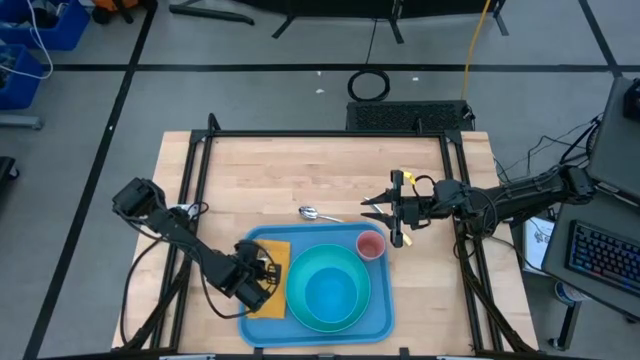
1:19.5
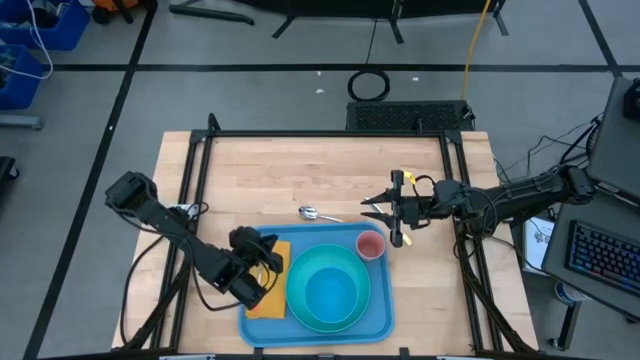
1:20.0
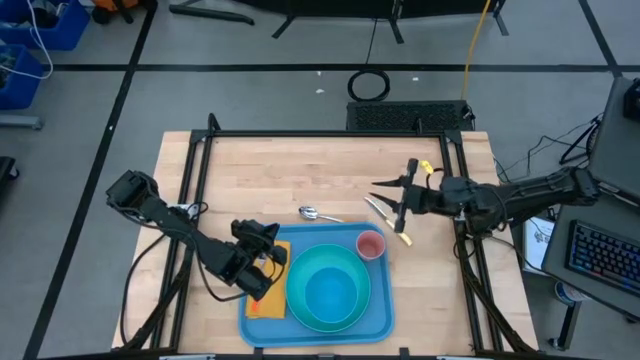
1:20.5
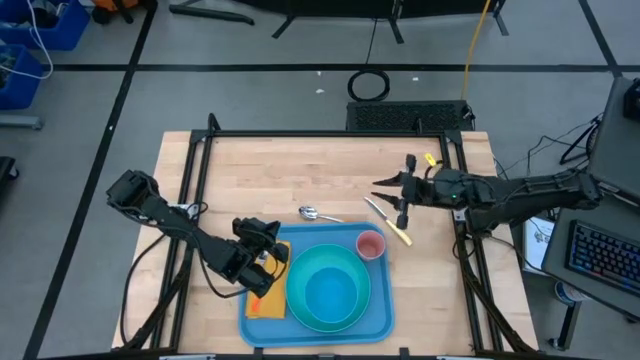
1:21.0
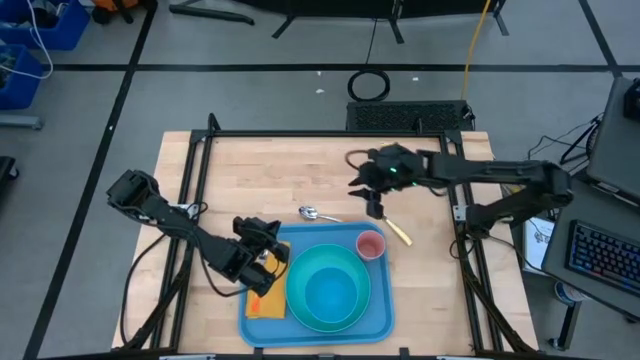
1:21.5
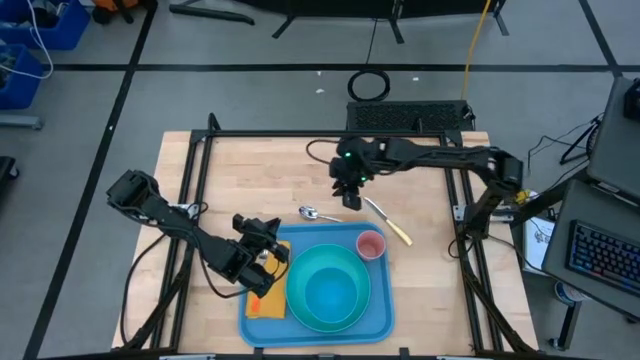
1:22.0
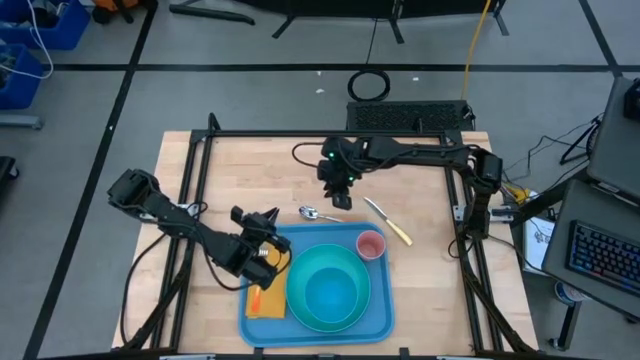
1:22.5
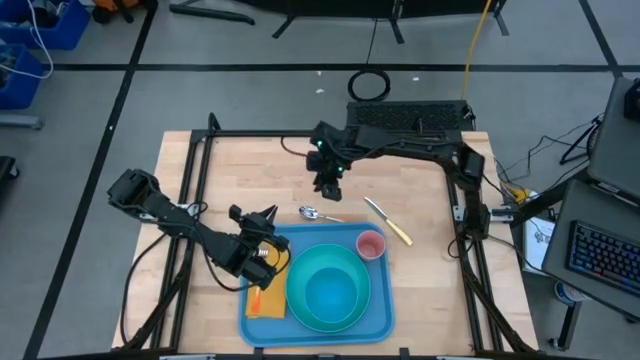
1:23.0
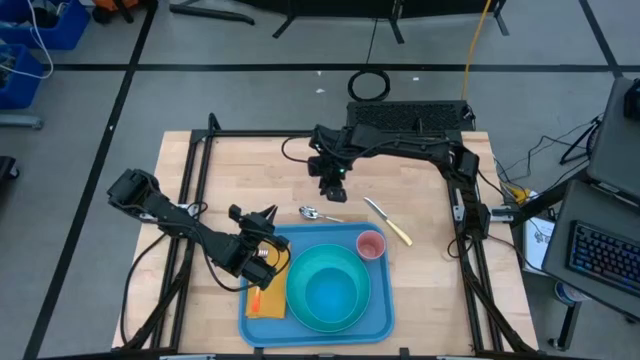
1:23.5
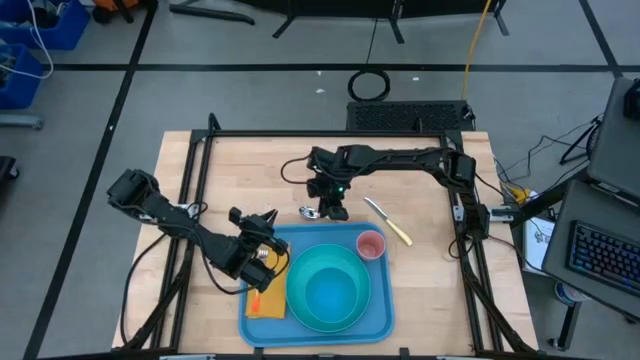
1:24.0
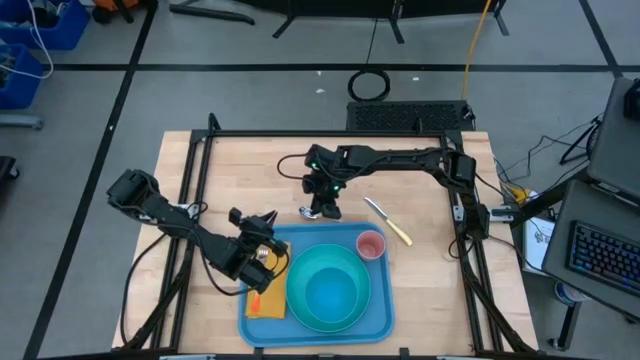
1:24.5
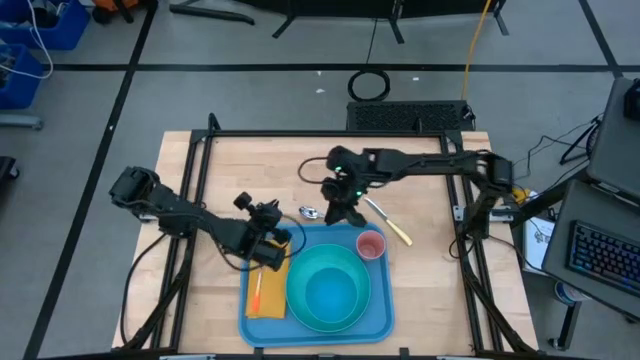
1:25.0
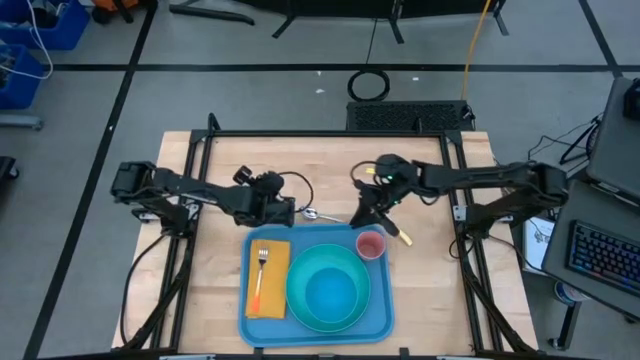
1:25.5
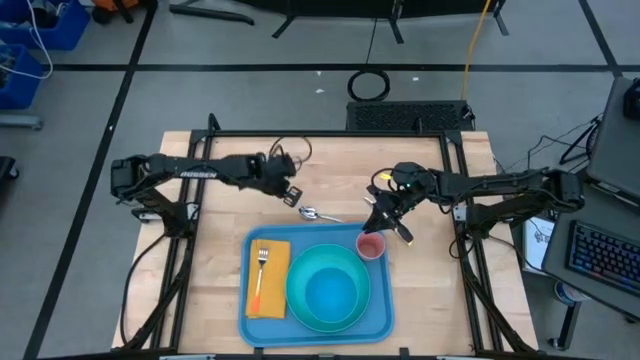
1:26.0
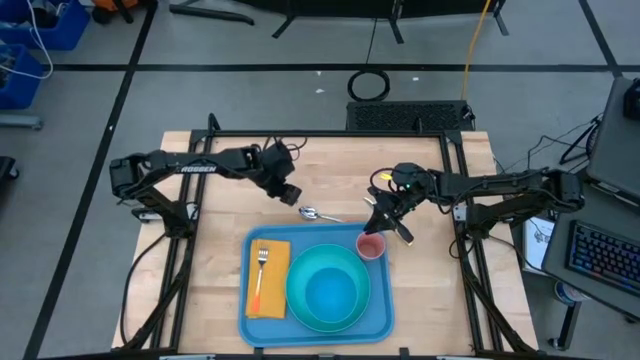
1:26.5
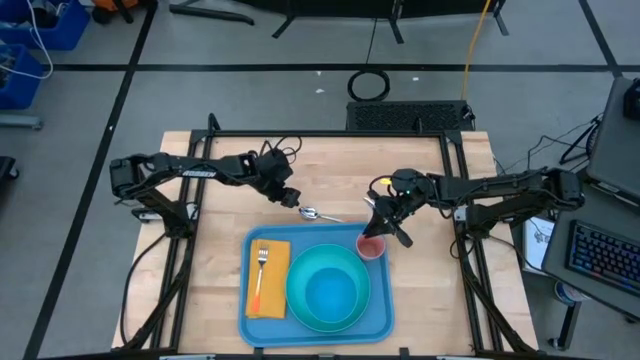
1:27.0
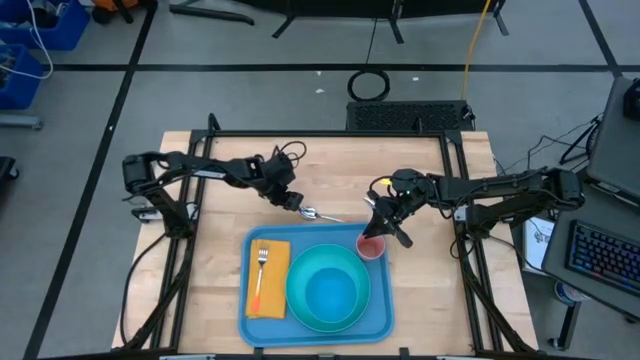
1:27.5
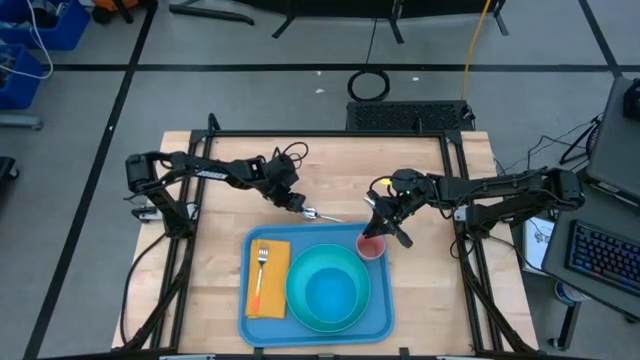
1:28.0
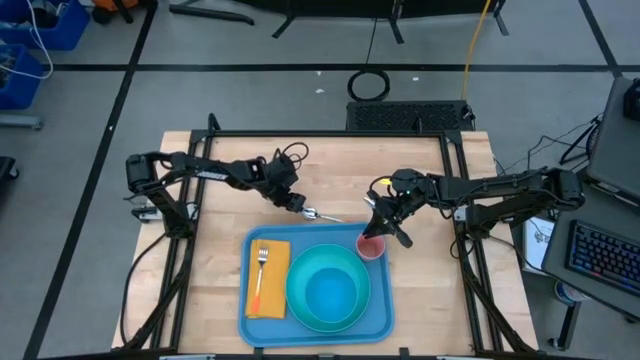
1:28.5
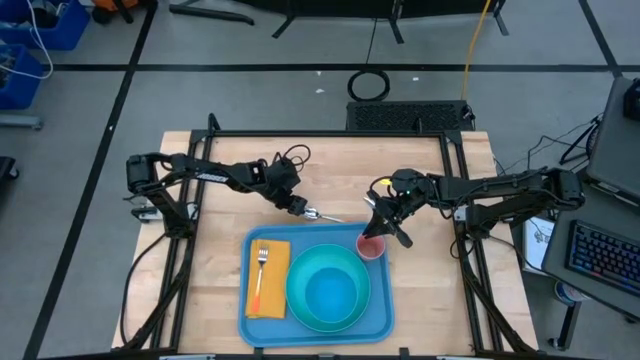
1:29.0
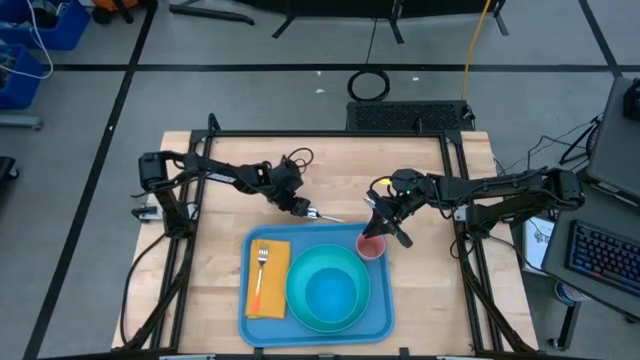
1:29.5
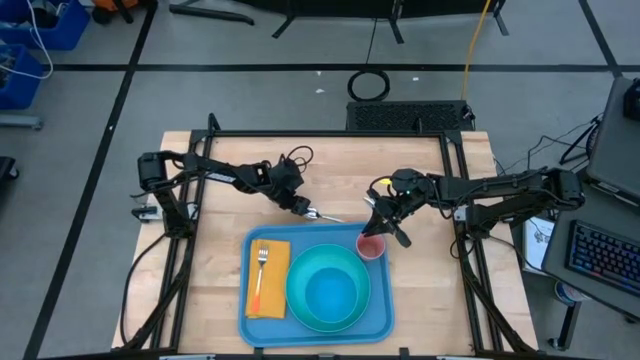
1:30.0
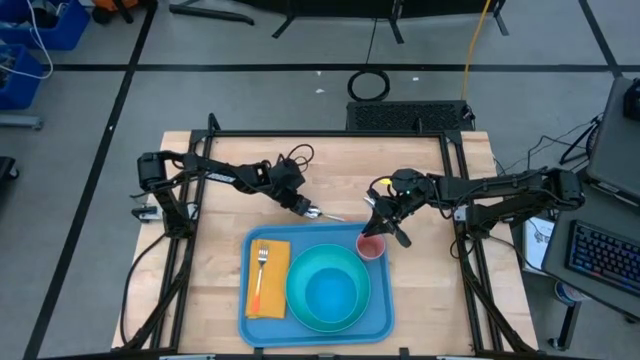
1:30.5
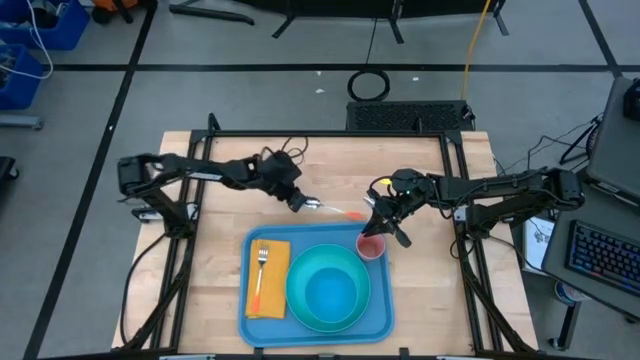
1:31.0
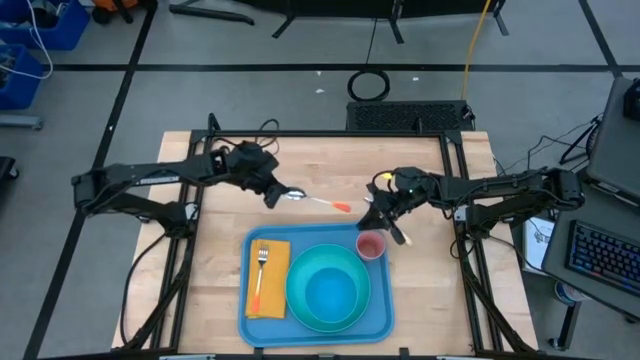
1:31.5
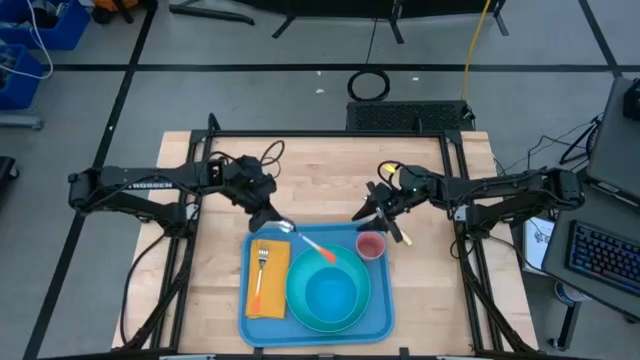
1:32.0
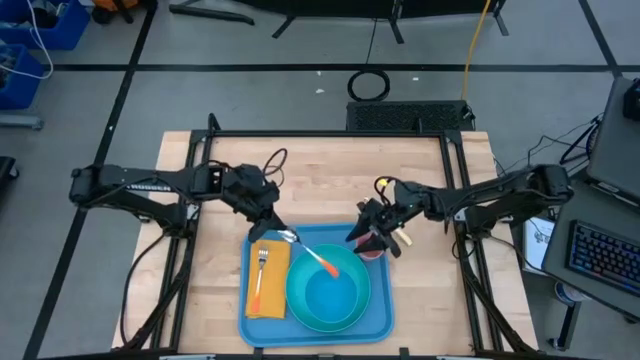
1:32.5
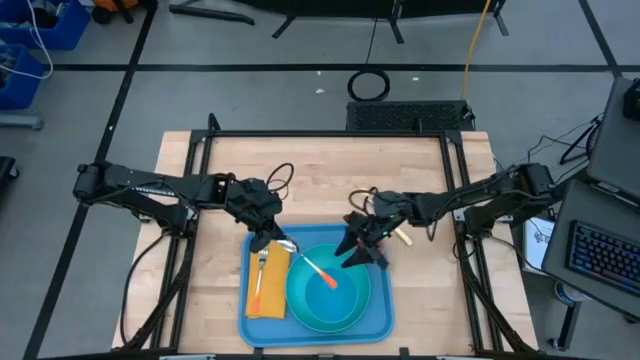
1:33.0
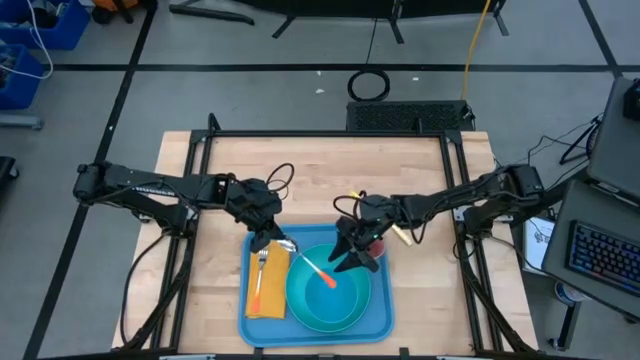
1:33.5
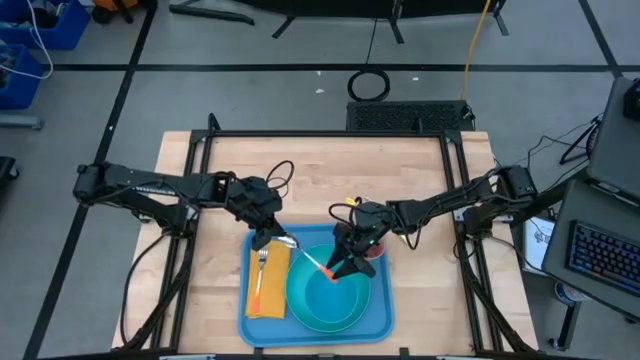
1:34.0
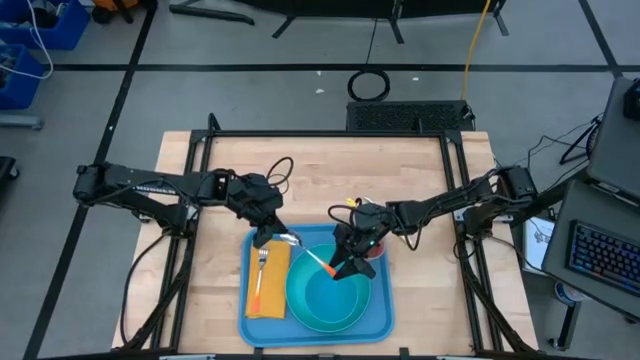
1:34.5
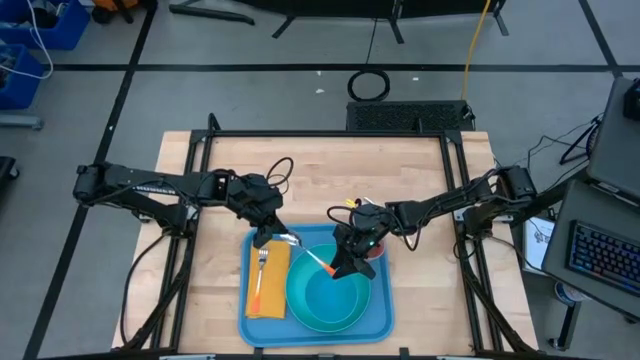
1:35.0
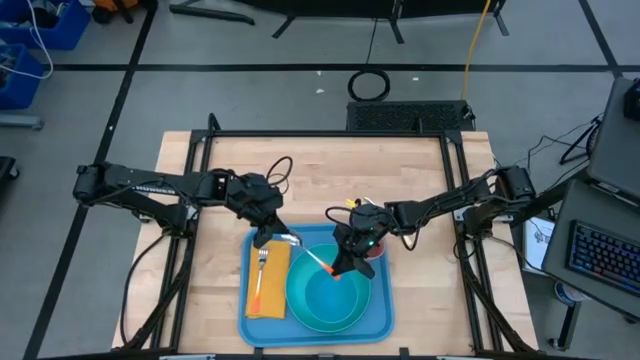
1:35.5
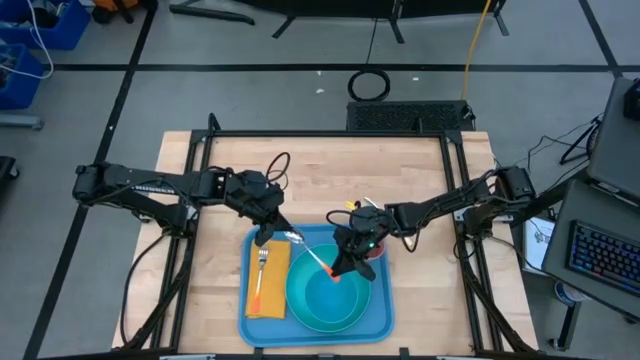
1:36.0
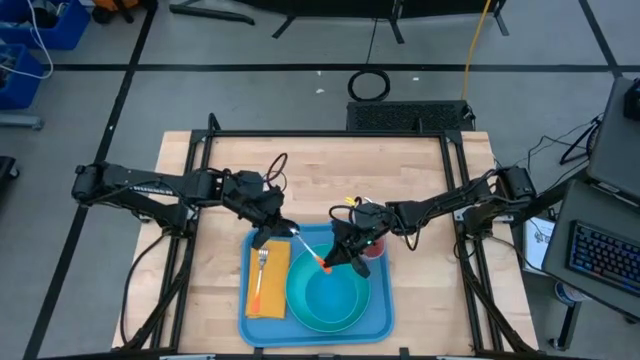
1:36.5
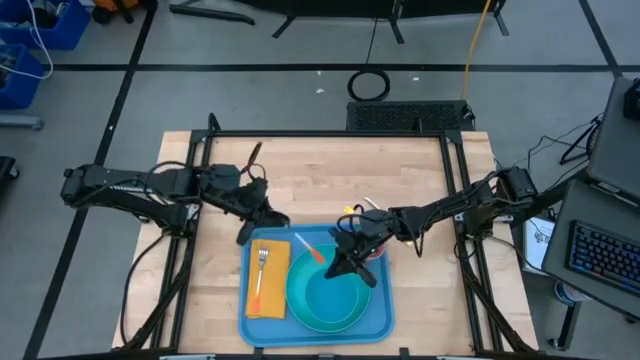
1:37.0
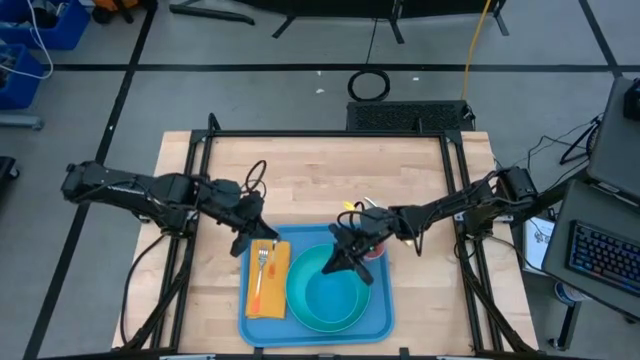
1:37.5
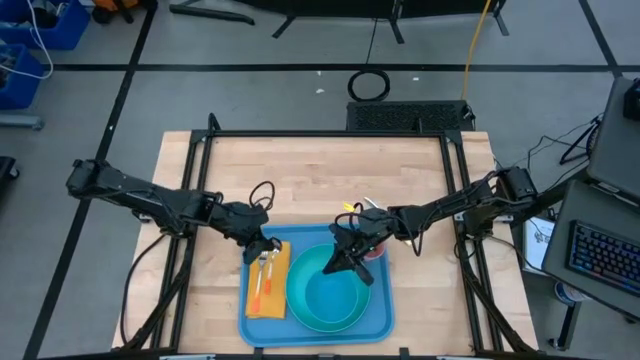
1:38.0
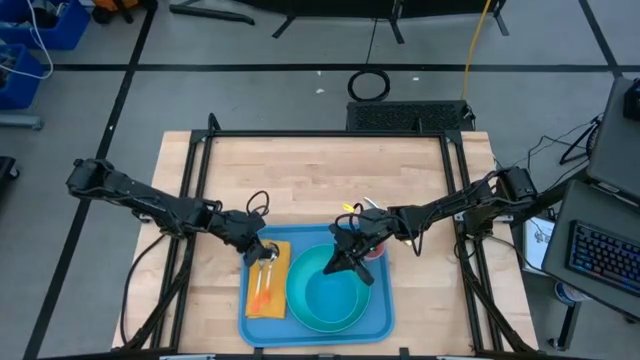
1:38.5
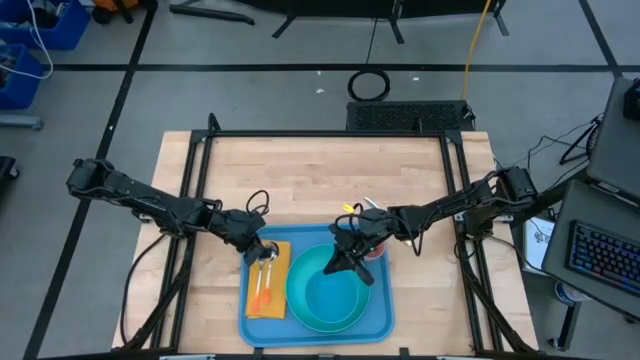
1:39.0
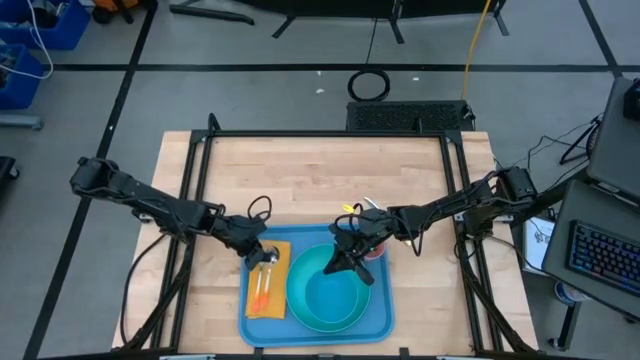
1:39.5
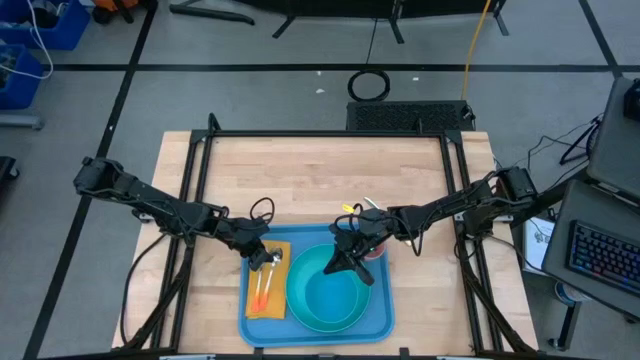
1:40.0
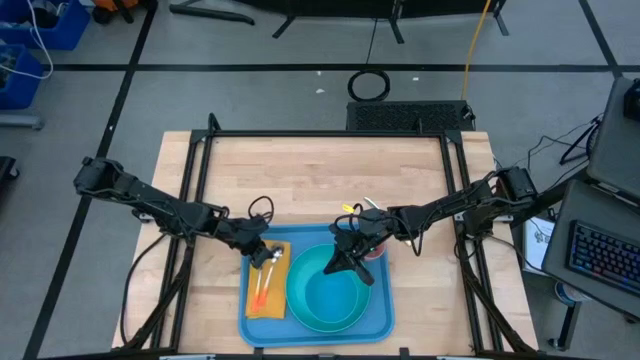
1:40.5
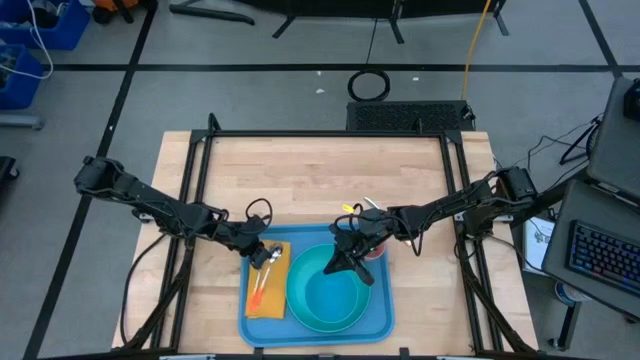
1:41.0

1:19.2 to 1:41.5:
Task: Set up tray
Put the orange spoon on top of the yellow table napkin to the right of the orange fork
